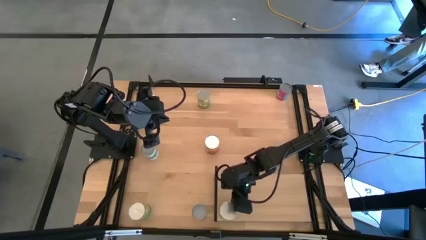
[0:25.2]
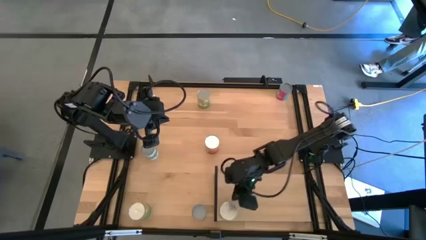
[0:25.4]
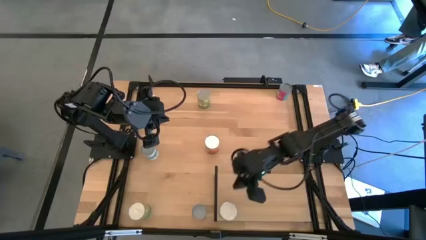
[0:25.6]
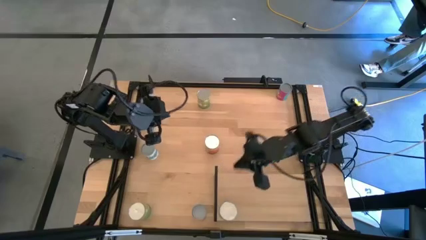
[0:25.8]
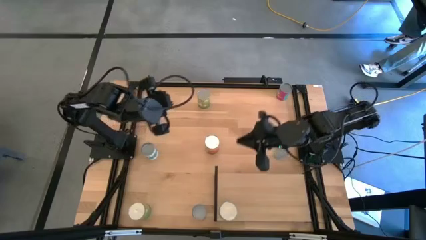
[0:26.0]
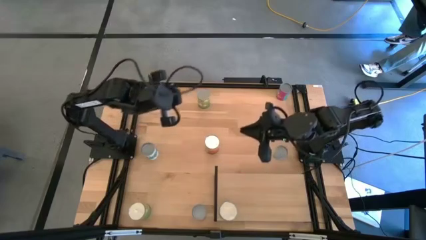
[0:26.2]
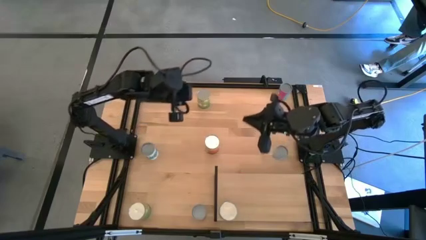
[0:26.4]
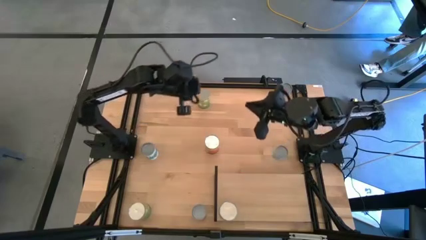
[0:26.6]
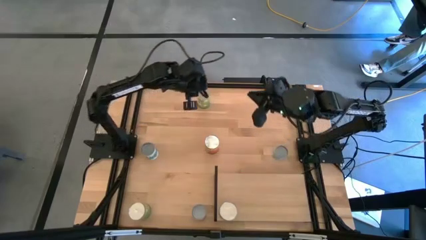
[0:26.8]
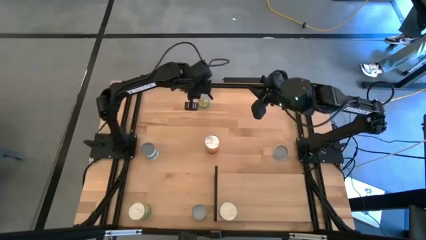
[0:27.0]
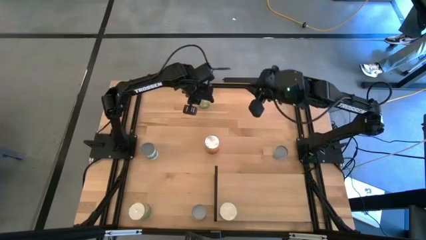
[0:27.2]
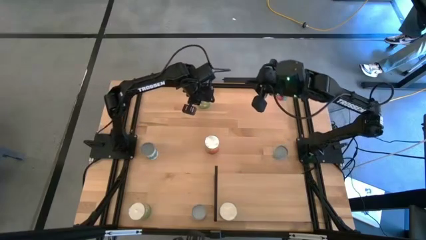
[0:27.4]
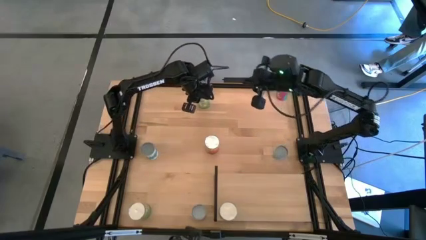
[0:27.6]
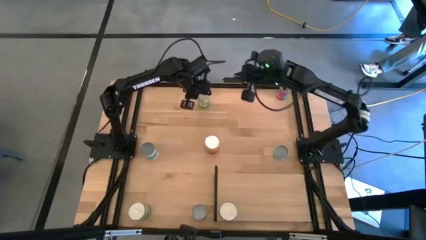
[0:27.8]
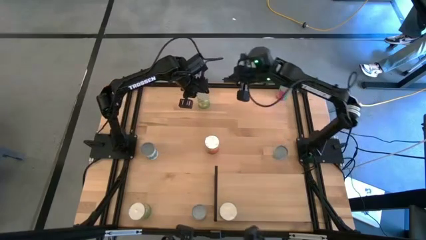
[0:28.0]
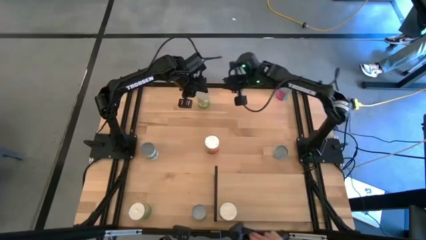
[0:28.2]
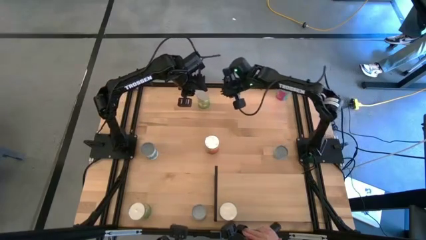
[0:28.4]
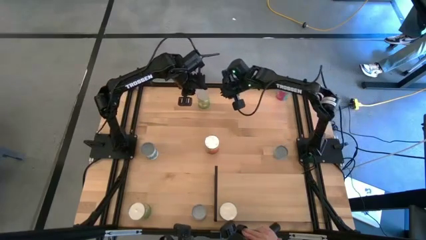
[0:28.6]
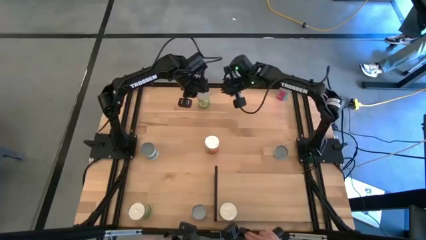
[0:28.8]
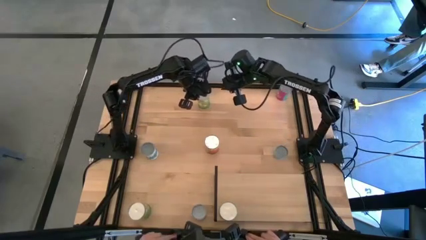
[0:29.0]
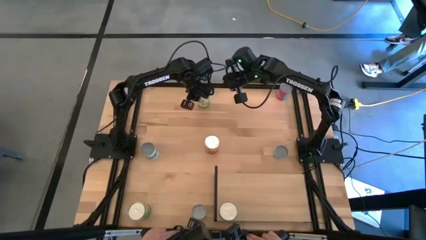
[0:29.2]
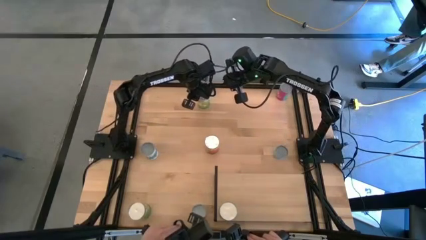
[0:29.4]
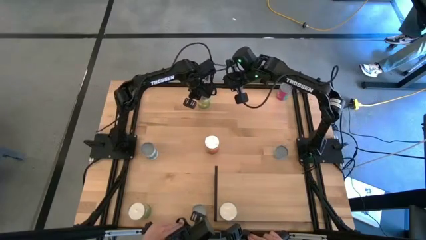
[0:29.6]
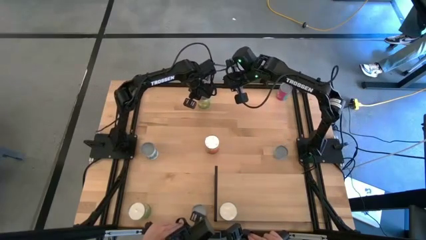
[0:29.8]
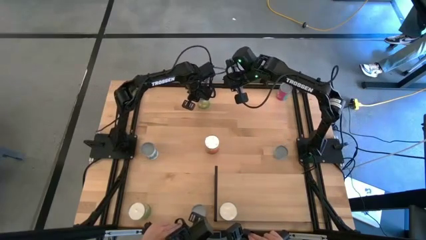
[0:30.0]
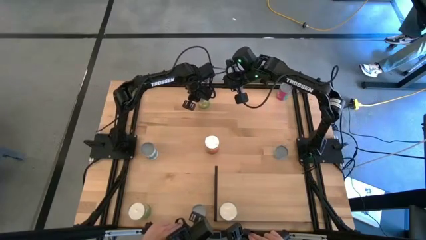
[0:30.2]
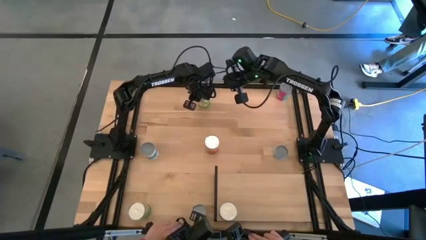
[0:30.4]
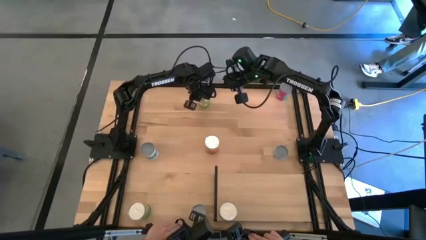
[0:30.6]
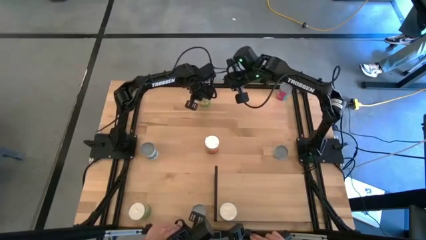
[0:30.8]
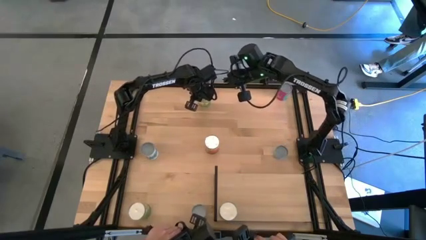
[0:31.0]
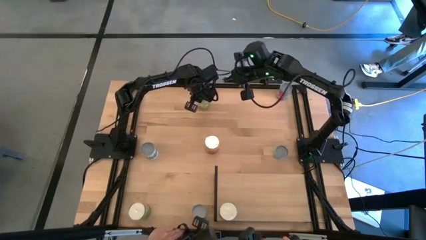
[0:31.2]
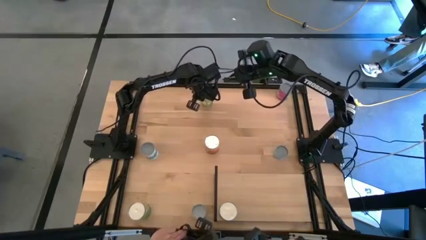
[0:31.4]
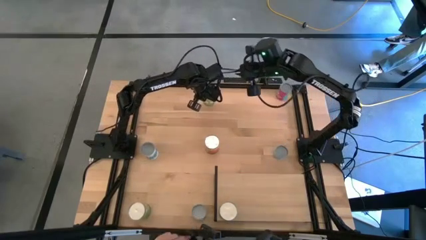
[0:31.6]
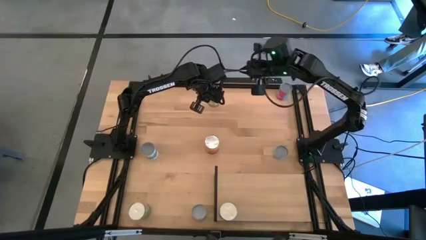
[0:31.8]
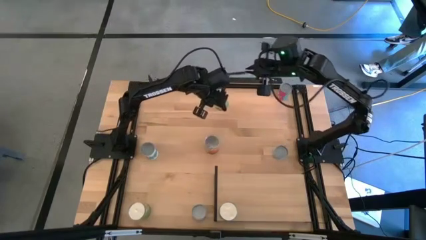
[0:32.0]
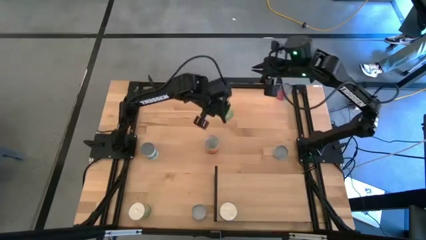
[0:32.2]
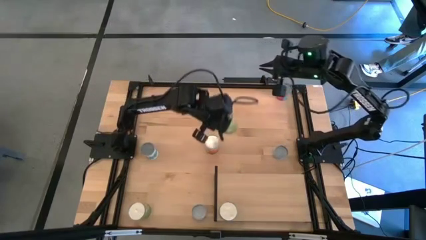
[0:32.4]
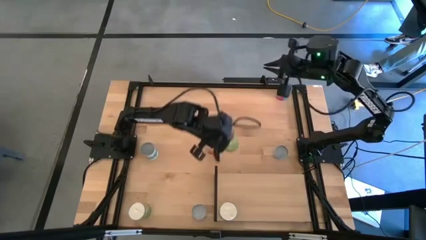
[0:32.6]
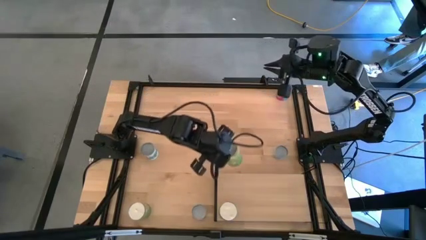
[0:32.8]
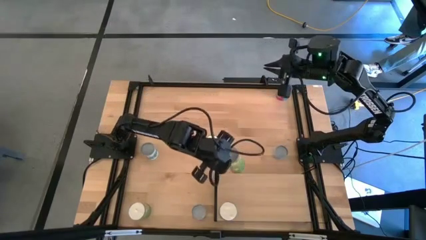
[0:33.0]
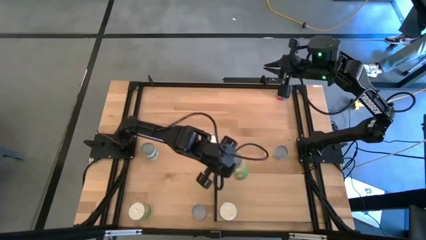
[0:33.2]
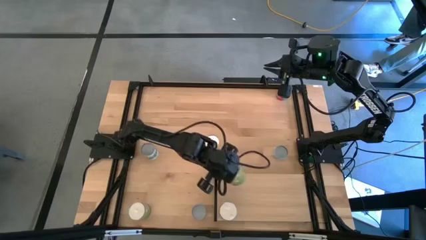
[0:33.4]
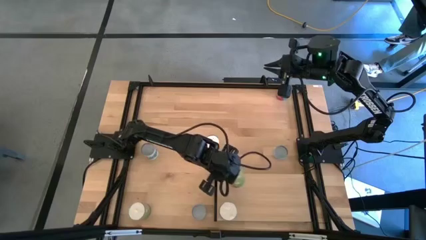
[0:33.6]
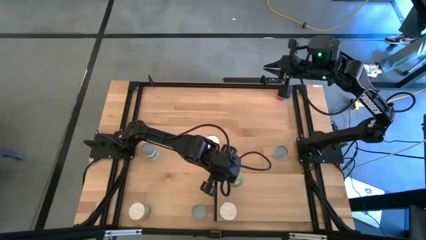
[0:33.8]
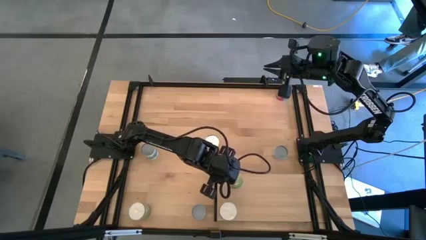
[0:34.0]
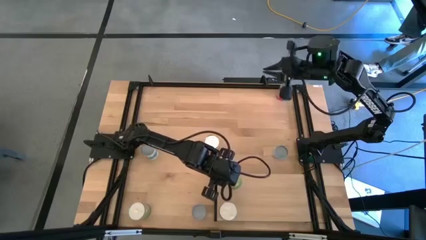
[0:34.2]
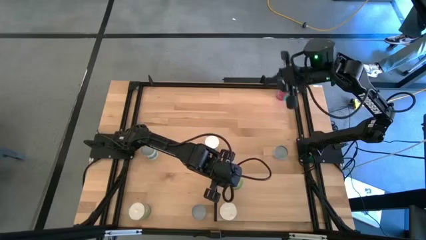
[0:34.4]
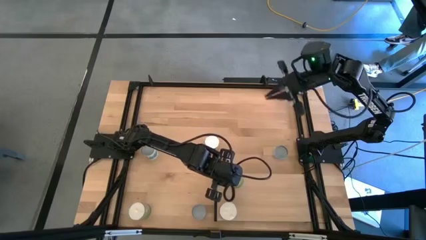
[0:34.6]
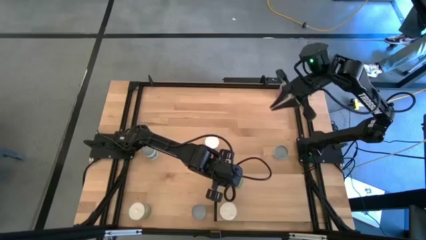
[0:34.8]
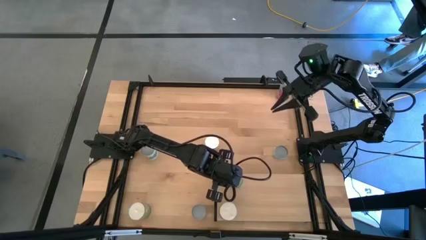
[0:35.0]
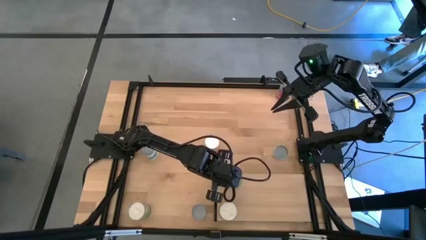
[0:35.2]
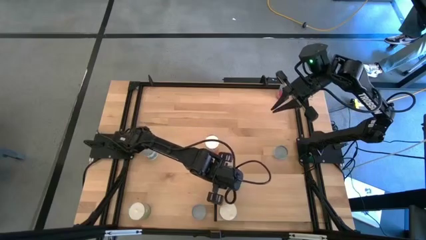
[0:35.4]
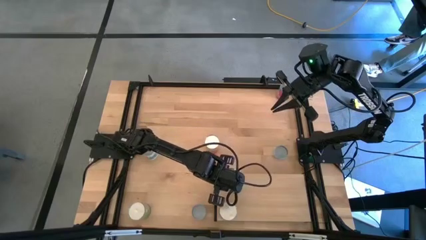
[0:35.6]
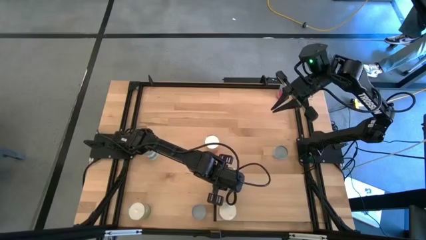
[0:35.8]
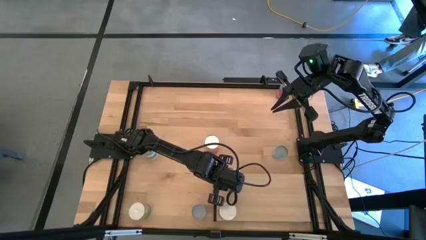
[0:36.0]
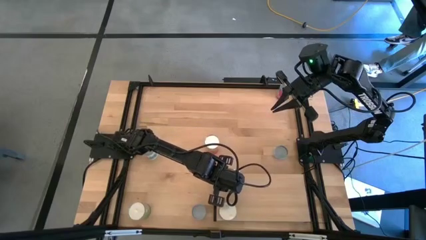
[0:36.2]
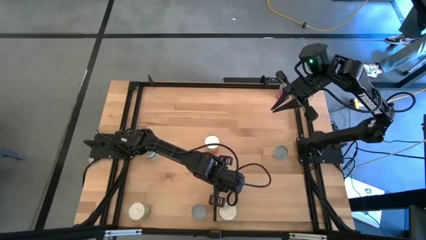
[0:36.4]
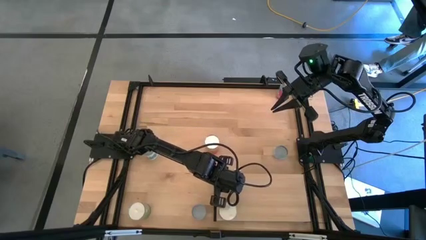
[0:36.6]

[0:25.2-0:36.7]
Task: Pick and place cans onto a shelf
Put the canned pears on the shelf aligned with the other canned pears

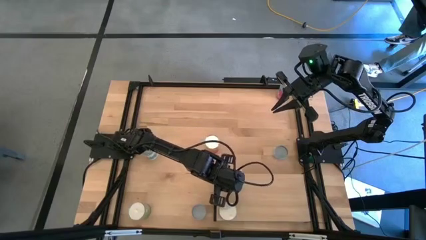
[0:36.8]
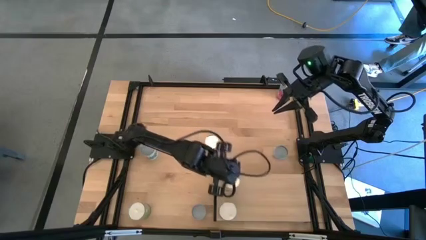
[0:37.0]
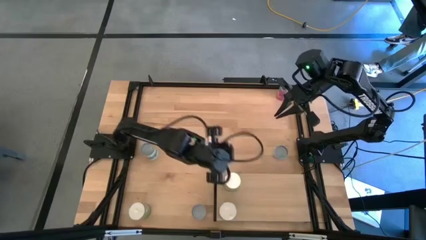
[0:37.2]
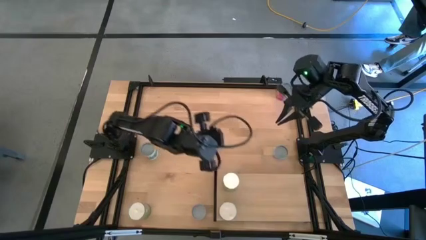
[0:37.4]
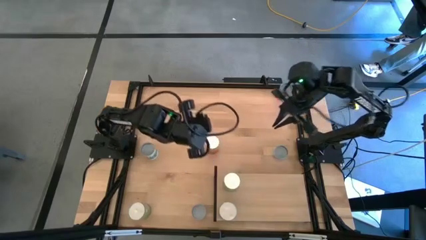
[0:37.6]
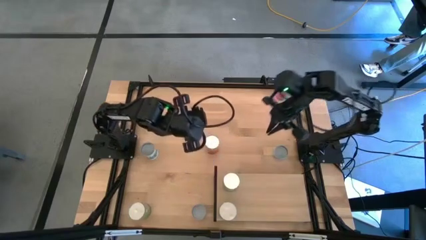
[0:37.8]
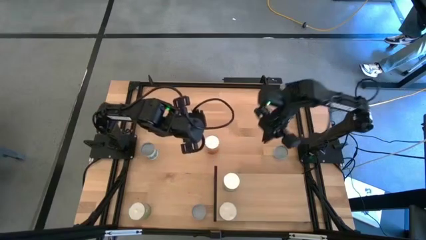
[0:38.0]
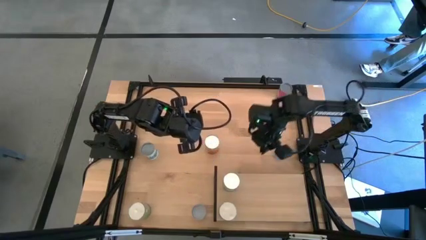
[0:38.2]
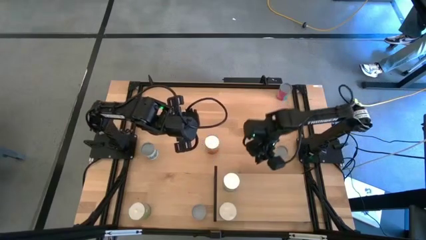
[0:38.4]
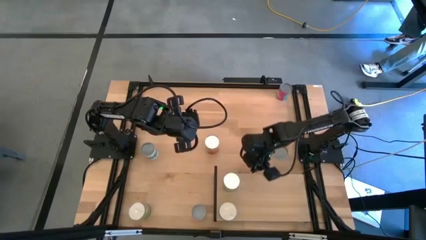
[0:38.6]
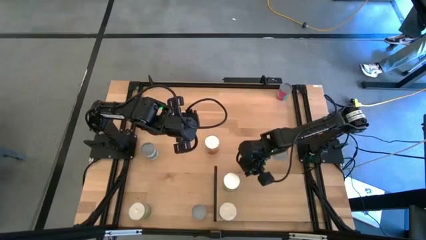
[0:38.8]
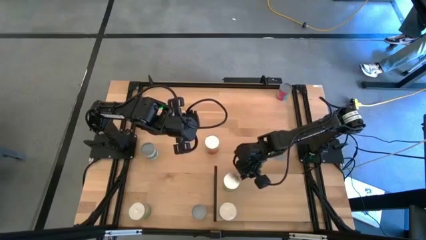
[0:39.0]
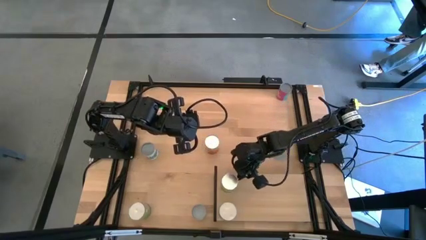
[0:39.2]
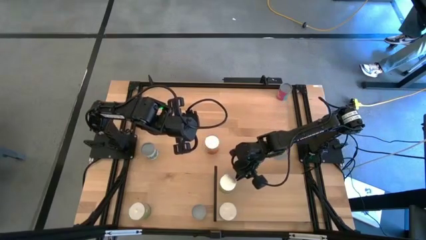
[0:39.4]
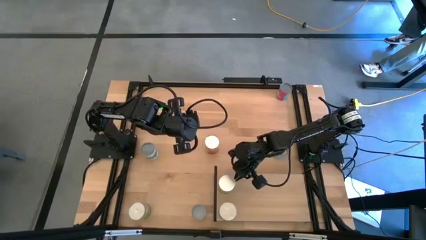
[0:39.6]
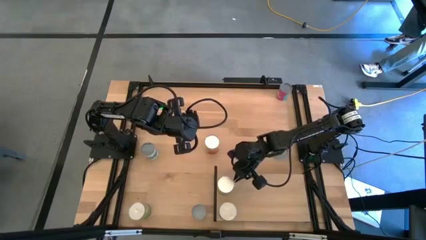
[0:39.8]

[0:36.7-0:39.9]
Adjust the canned pear on the shelf
